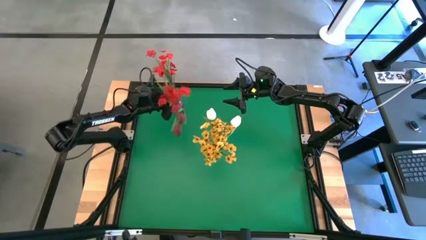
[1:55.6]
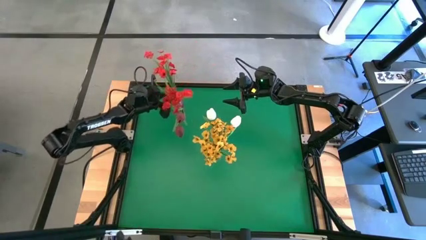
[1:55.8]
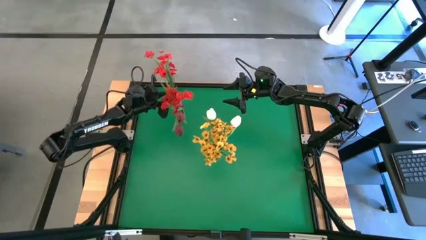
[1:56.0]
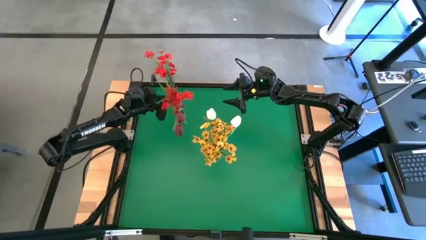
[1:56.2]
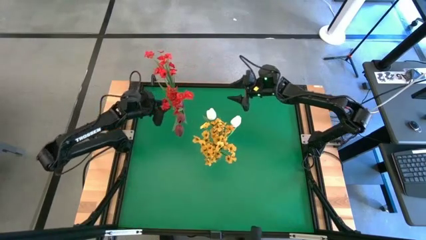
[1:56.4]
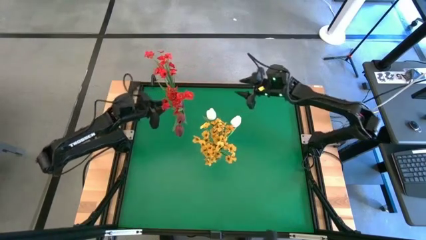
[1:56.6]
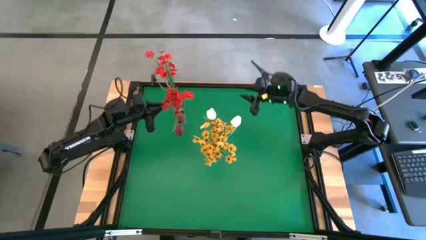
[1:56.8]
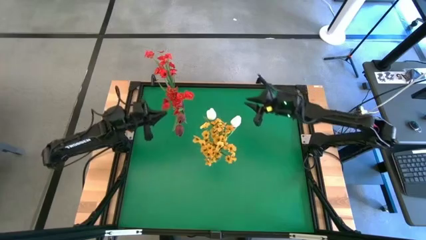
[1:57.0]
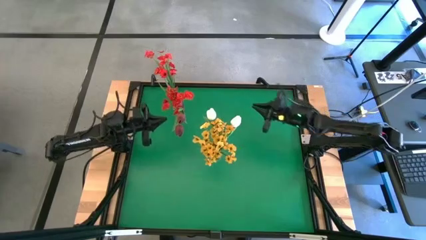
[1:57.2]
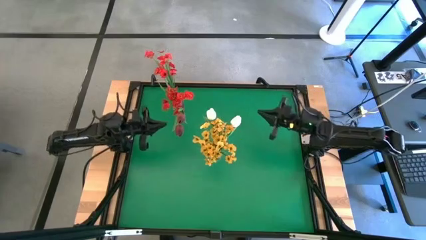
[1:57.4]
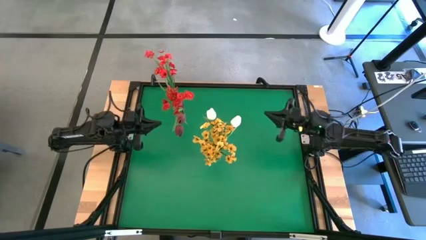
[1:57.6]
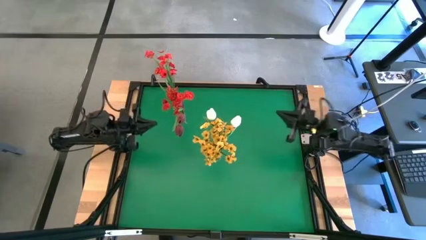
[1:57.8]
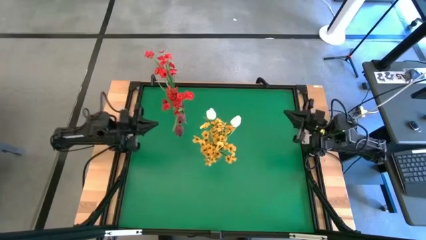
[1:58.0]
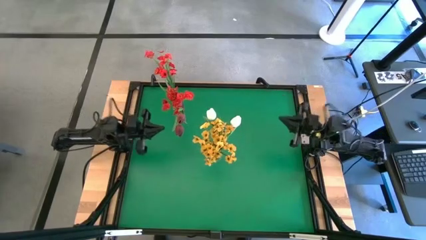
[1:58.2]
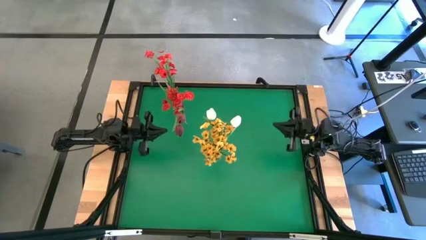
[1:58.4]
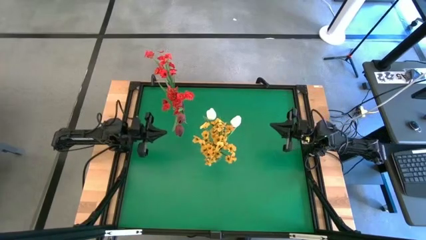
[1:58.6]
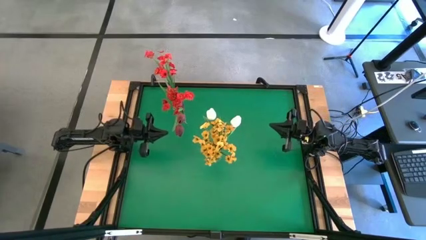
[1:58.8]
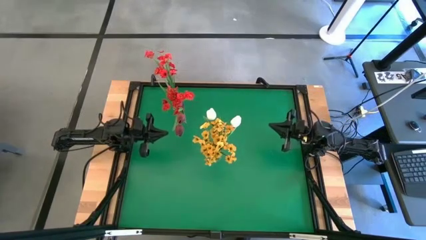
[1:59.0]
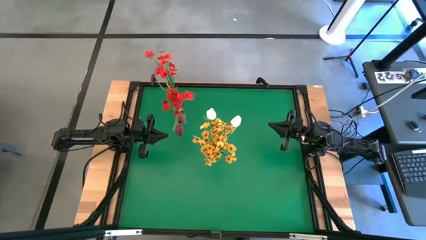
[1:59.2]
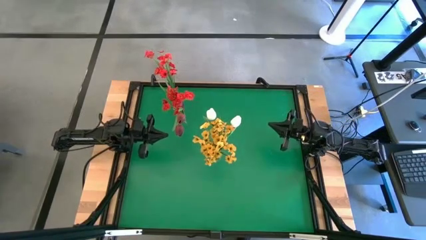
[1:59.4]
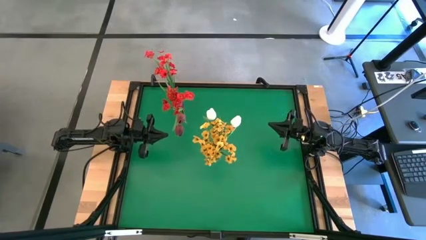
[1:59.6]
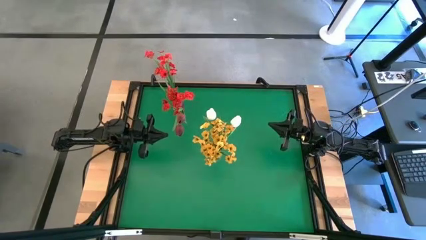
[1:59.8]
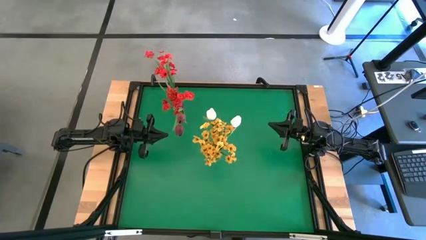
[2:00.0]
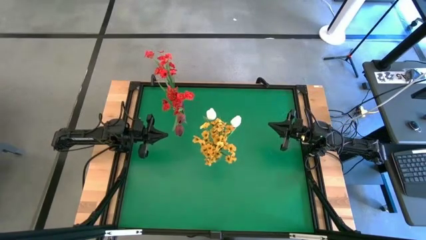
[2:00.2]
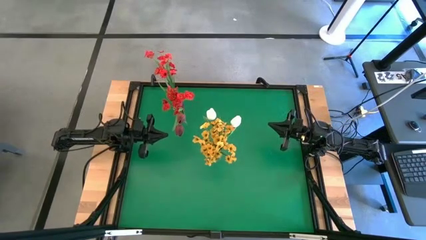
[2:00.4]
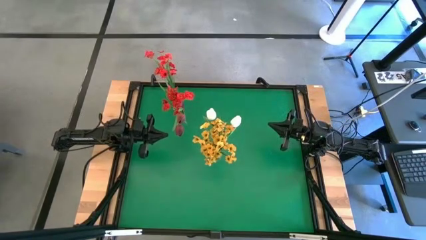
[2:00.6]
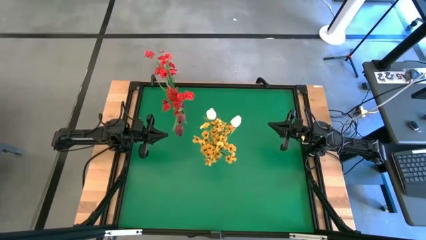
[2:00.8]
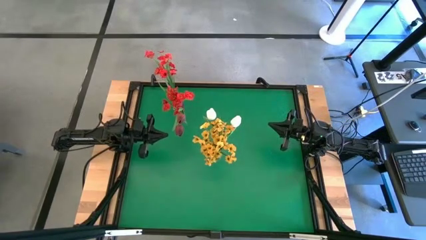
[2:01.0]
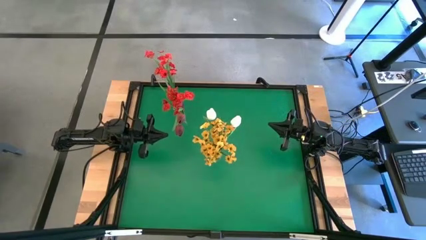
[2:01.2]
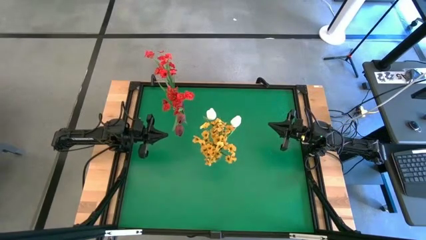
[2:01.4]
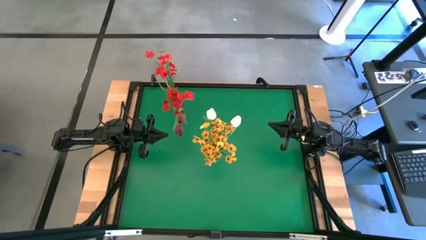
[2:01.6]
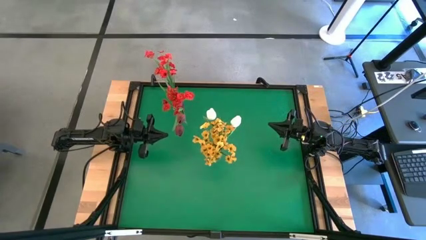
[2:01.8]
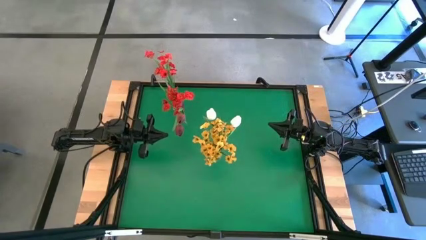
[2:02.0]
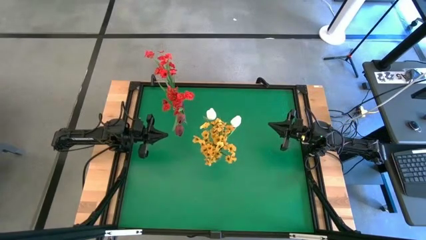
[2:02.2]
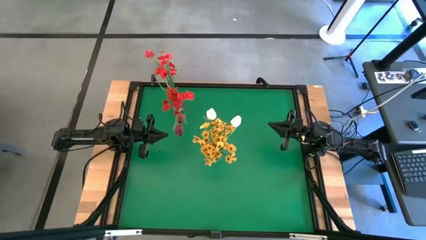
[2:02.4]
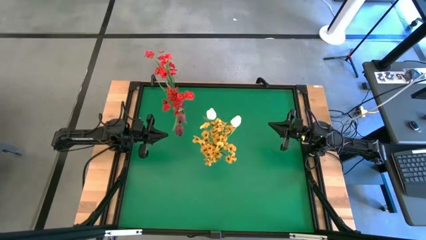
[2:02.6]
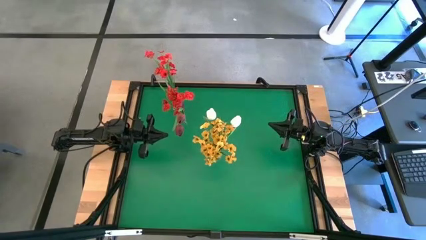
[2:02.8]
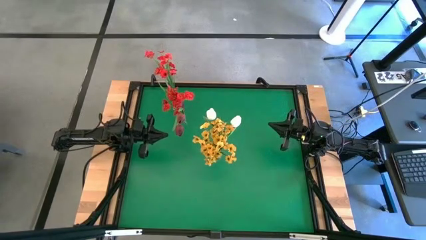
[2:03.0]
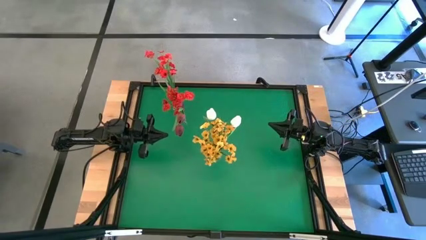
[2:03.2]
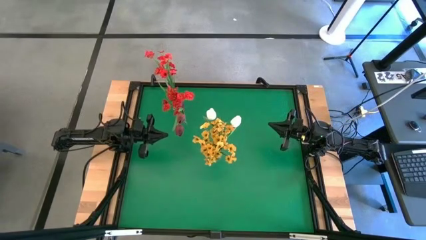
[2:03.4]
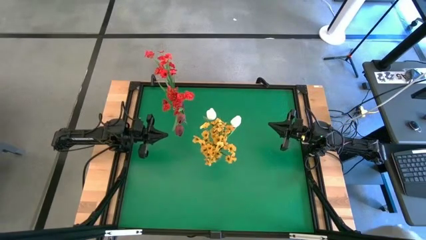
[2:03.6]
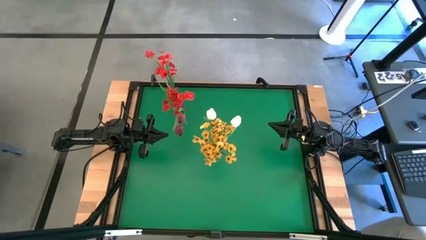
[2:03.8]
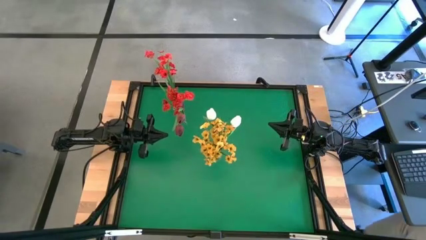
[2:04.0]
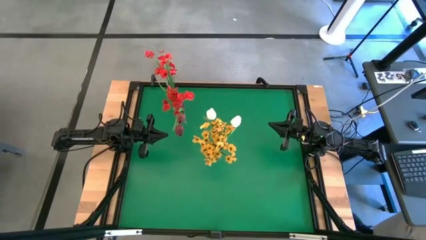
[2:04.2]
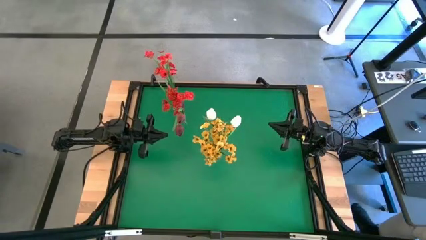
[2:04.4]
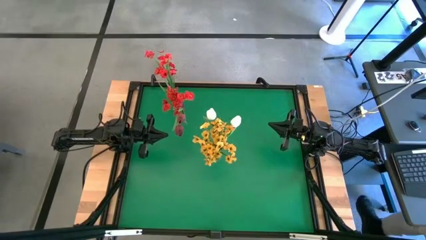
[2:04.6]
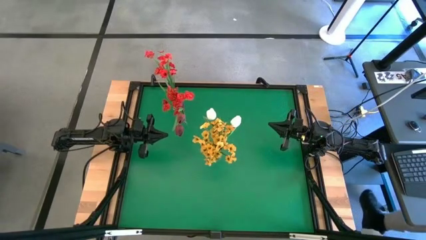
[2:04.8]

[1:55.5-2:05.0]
Task: Sort flowers into vase by color
Return to Home Position
